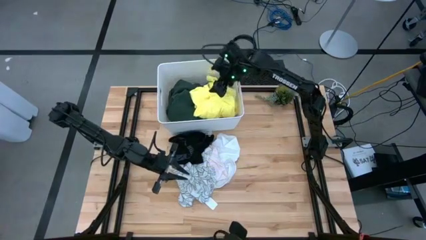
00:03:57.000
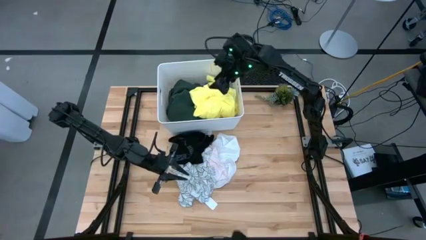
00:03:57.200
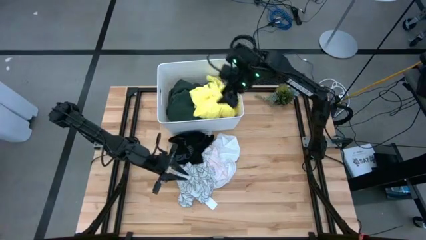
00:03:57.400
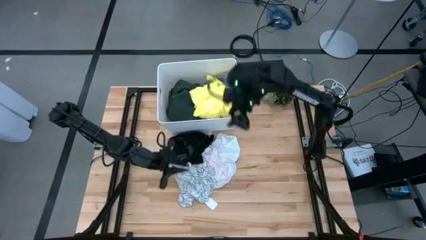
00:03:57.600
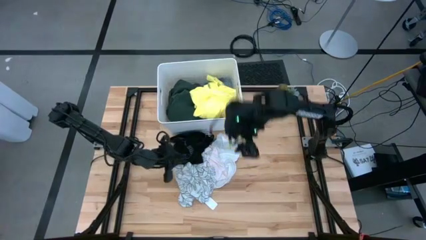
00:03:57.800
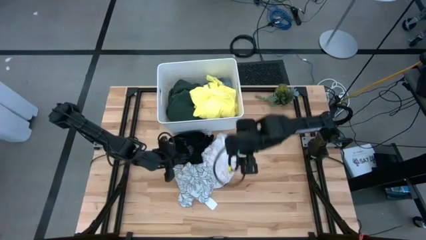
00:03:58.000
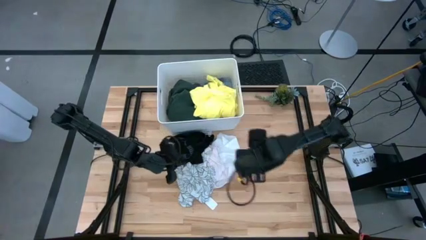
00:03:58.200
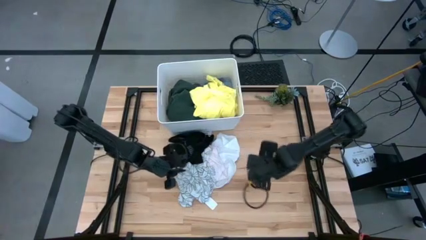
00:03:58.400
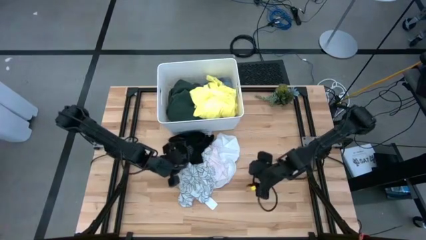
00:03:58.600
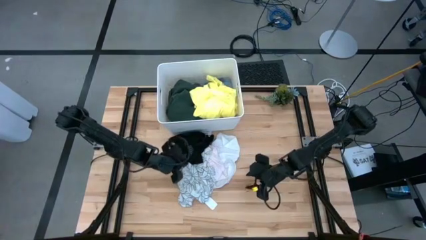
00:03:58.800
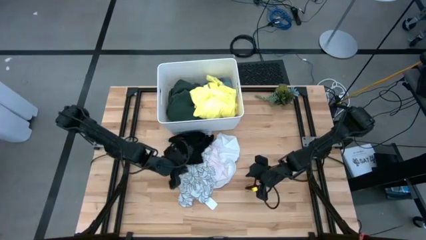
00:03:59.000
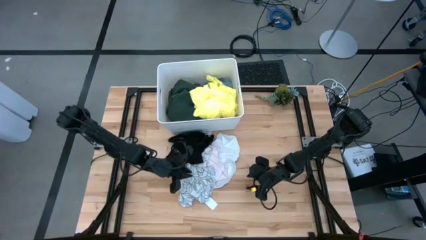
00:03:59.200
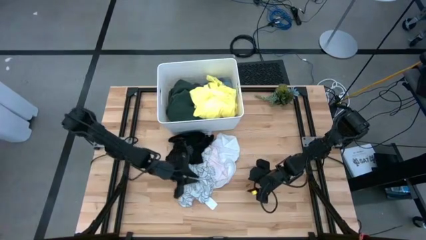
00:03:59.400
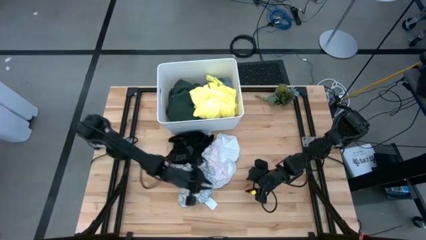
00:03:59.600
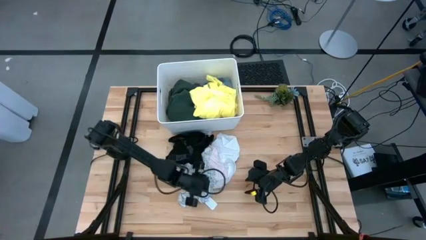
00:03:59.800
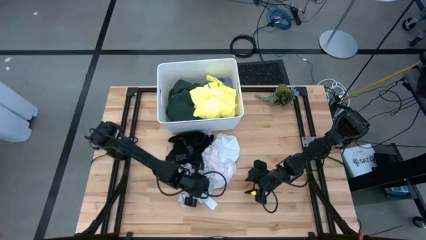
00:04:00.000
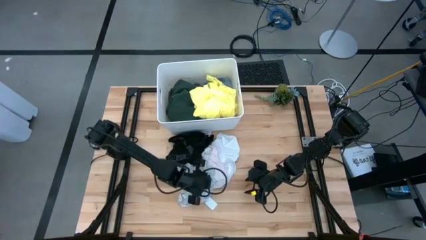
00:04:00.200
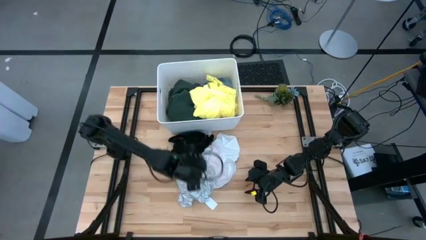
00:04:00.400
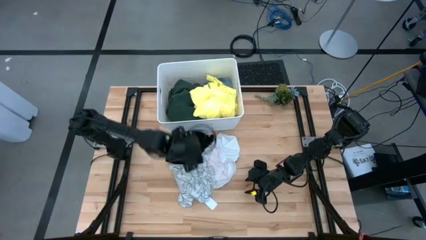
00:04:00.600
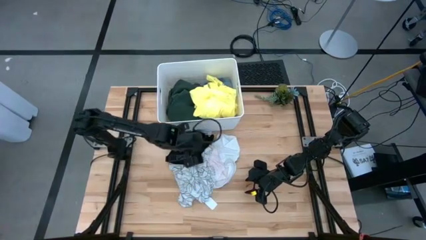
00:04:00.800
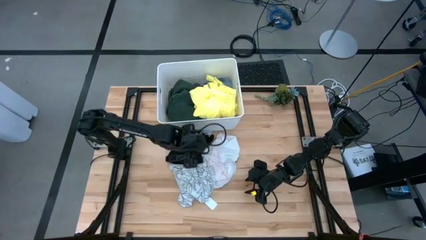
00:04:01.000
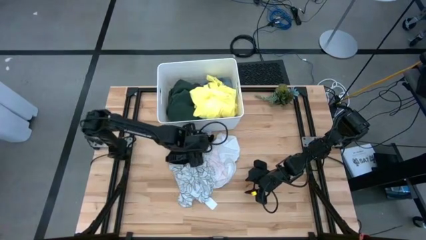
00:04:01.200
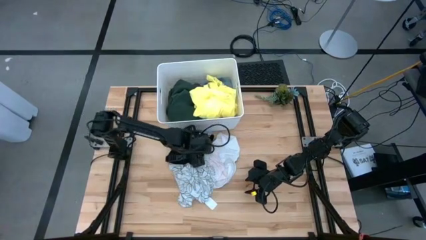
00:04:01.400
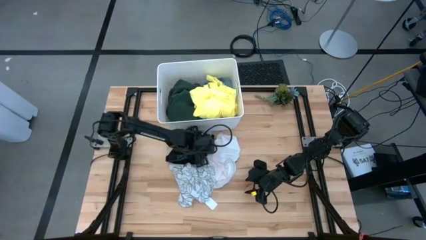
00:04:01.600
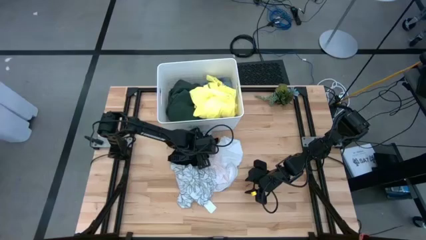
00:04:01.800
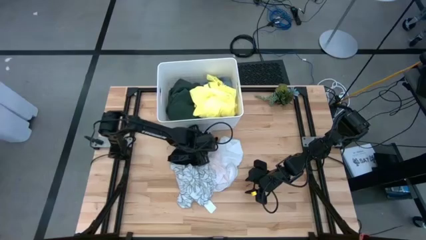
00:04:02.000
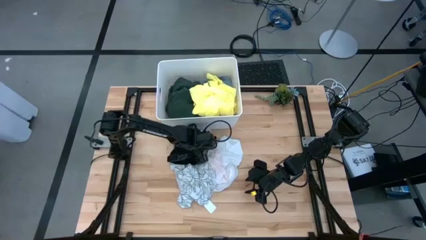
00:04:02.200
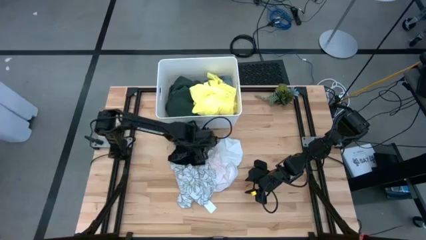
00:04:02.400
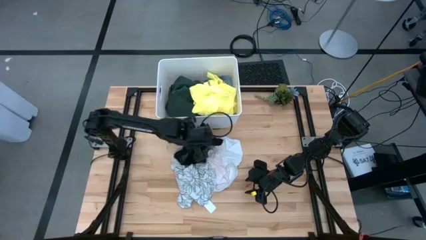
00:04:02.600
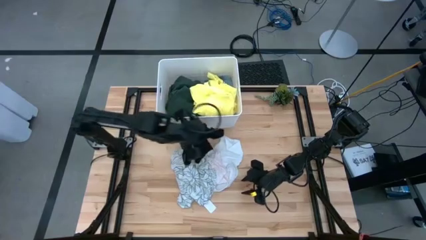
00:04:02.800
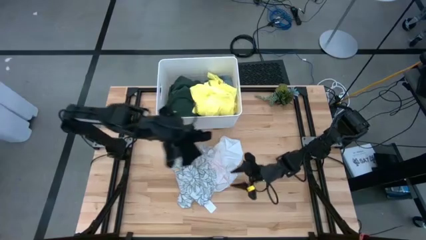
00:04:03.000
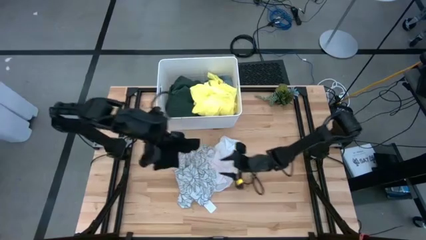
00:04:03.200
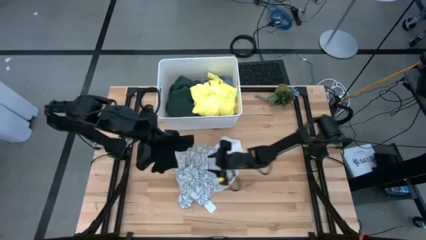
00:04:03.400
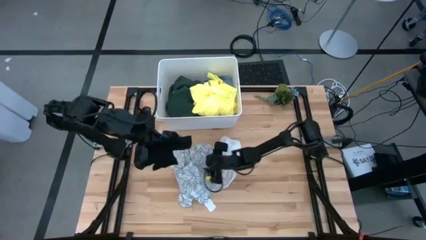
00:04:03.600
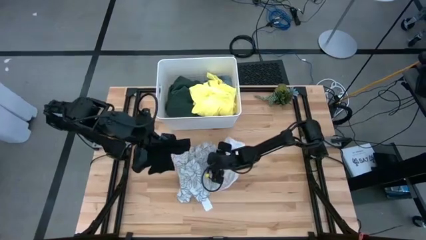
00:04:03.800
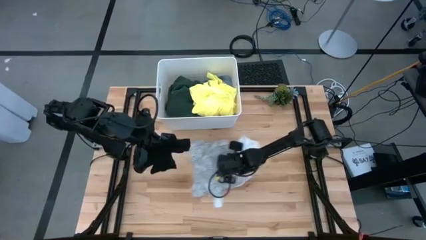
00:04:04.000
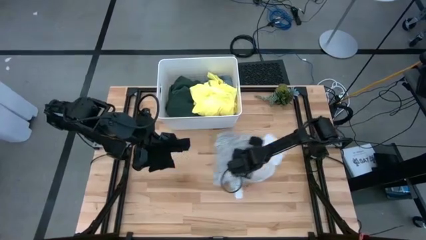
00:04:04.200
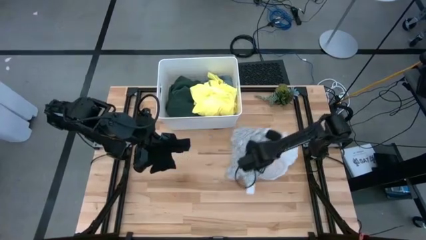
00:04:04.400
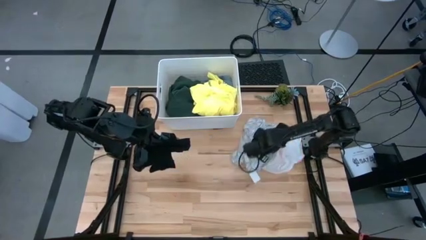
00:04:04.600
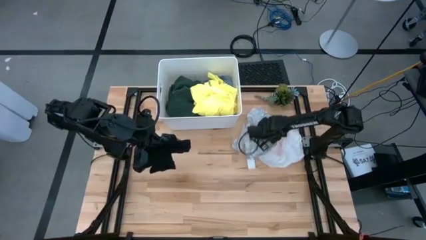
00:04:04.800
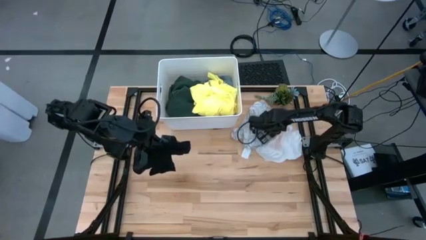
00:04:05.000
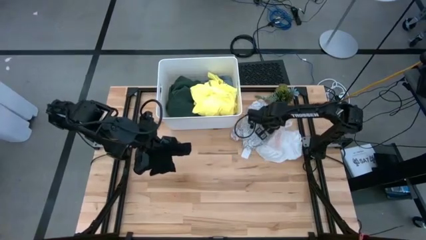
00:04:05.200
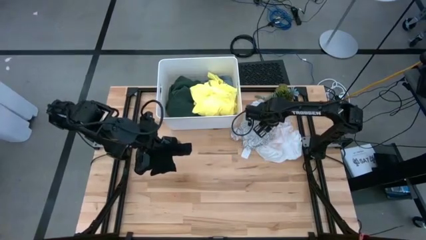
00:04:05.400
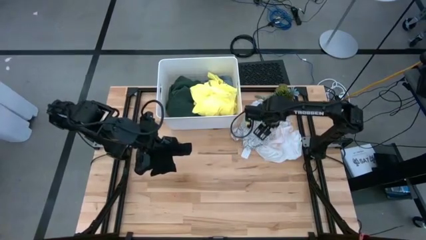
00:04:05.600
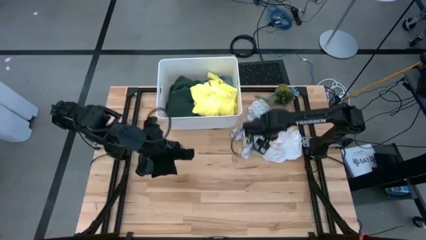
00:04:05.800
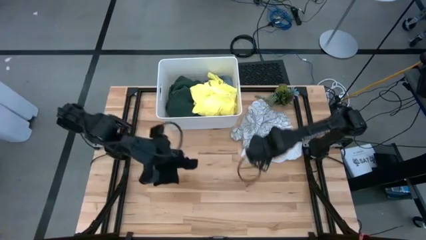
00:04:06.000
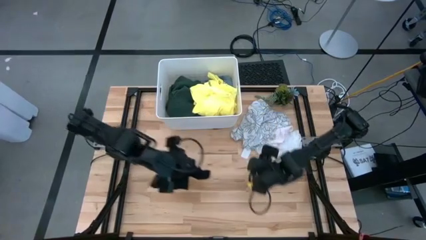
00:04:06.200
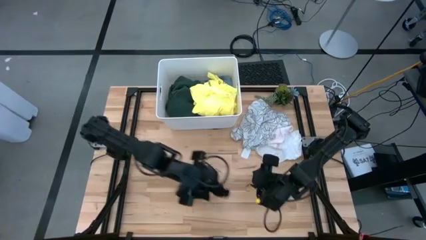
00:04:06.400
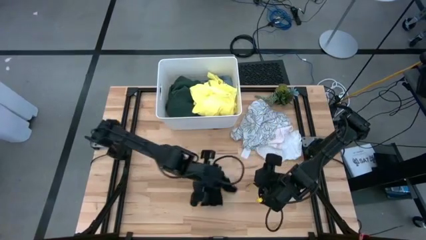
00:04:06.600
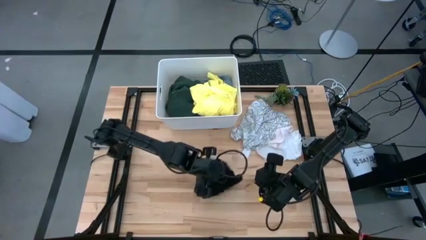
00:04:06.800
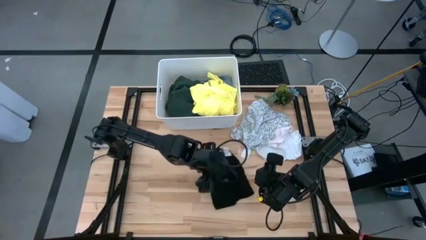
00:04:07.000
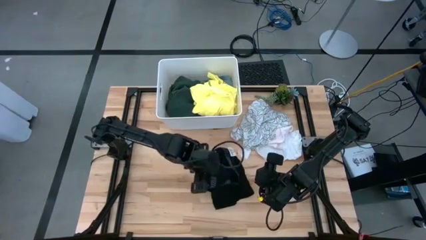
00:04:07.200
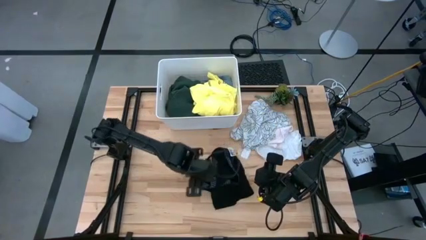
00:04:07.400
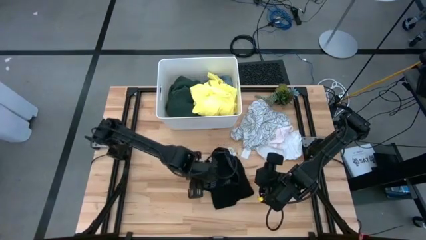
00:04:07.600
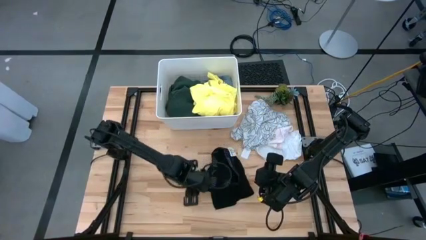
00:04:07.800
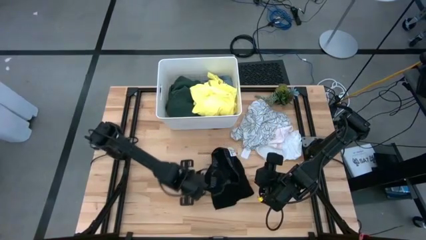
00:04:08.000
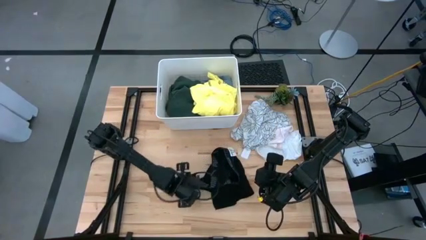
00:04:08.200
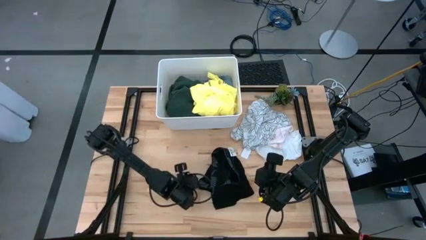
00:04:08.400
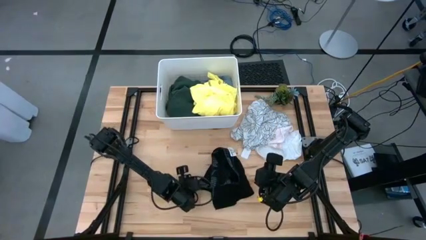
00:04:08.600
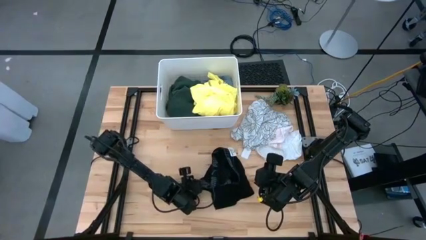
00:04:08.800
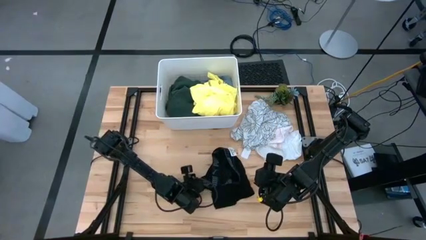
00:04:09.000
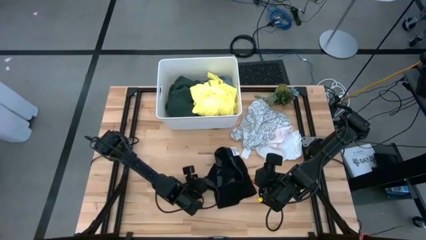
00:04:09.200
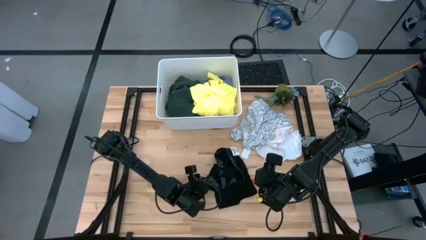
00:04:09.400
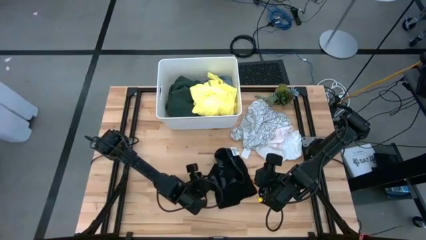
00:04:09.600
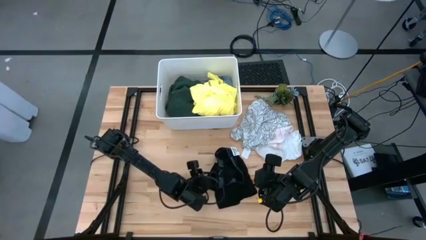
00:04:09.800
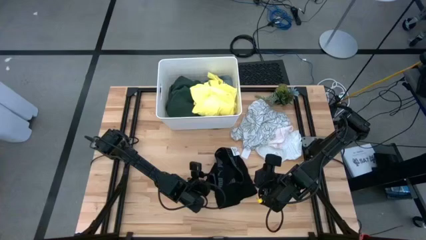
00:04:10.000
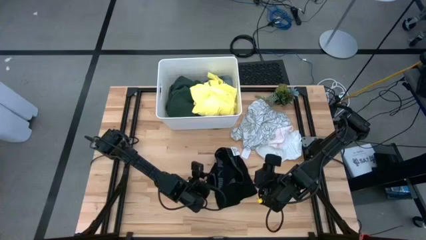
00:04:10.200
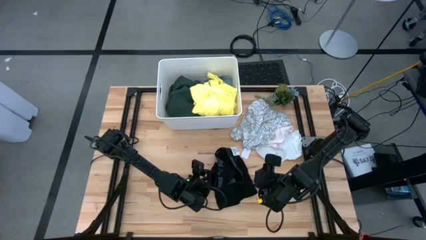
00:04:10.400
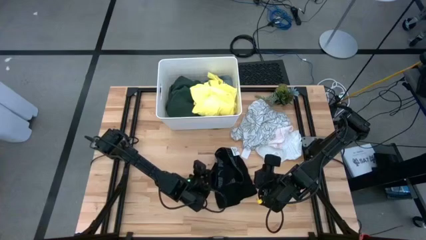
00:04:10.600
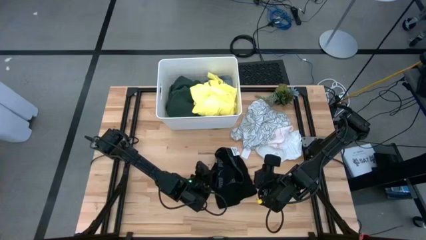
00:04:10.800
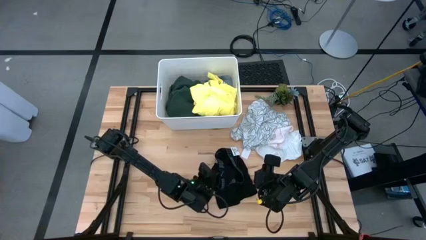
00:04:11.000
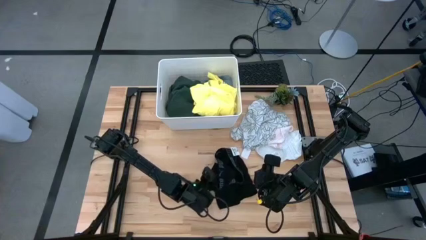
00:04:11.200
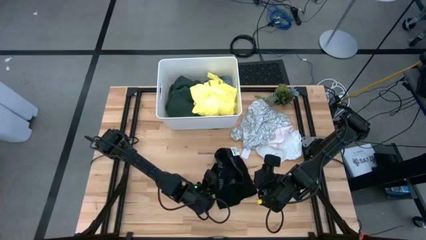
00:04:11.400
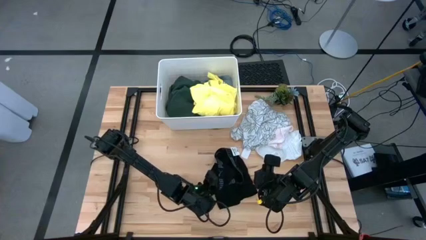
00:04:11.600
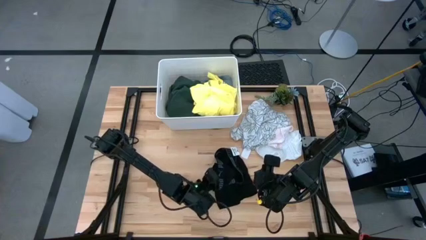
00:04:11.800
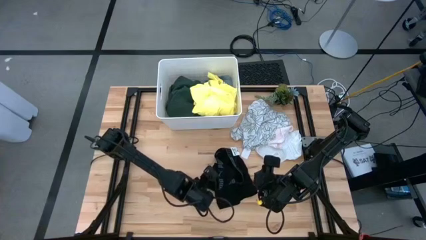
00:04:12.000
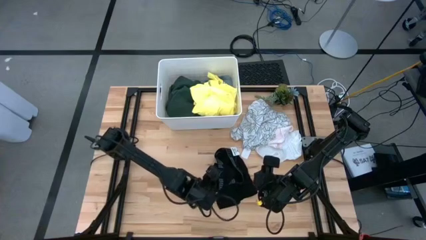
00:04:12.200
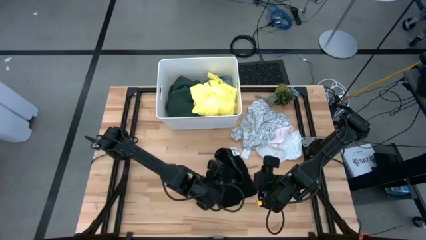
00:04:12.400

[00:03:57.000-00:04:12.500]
Task: Fold laundry
Fold the black underwear
